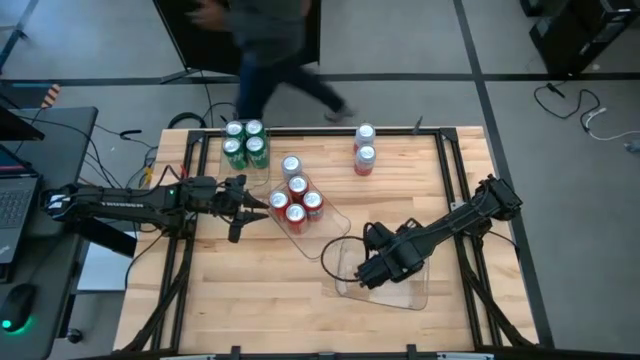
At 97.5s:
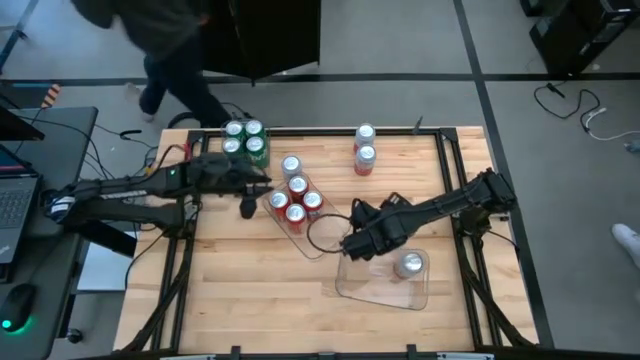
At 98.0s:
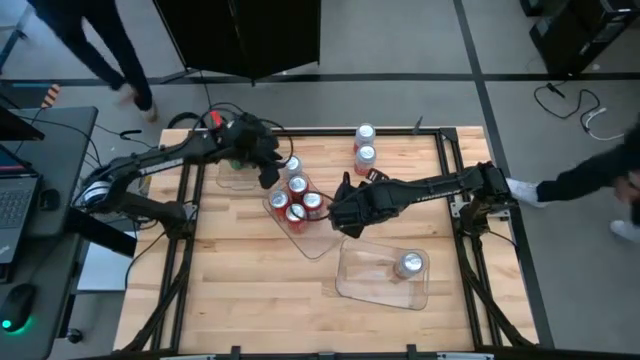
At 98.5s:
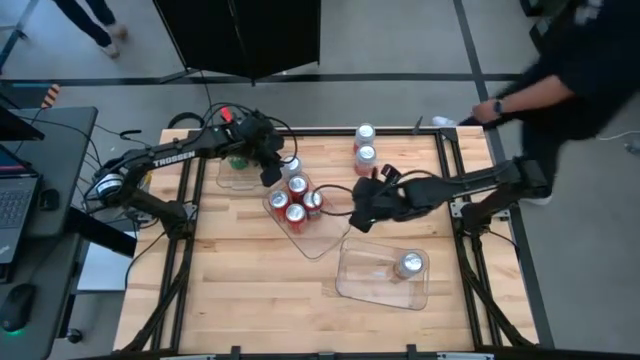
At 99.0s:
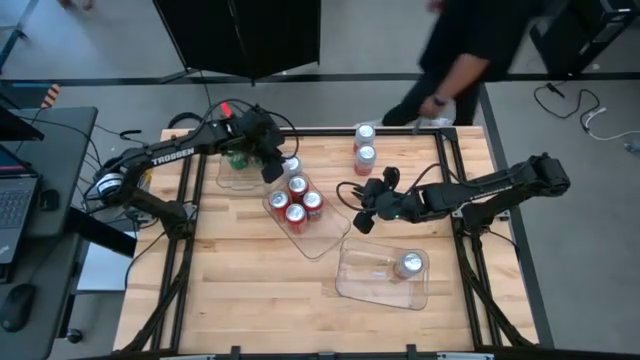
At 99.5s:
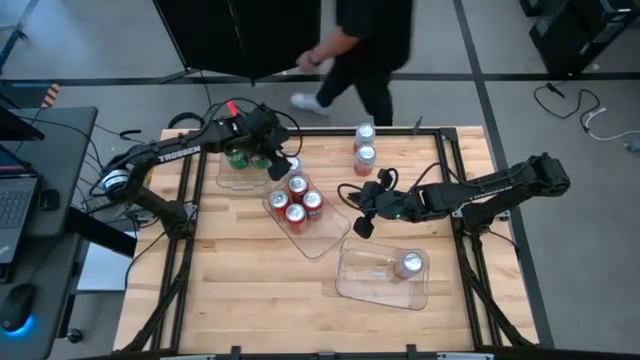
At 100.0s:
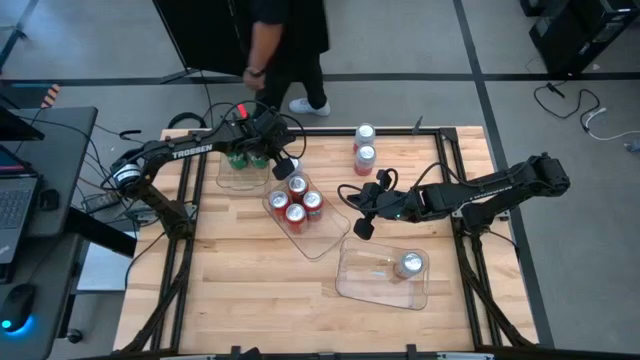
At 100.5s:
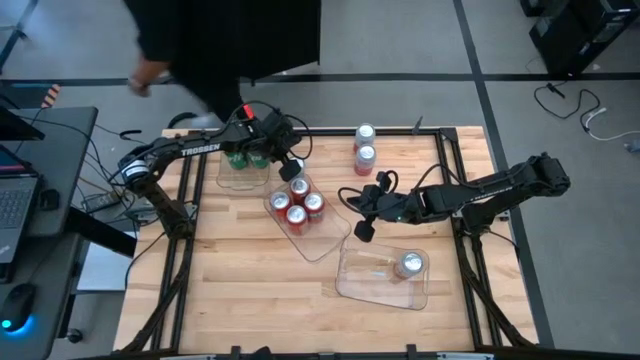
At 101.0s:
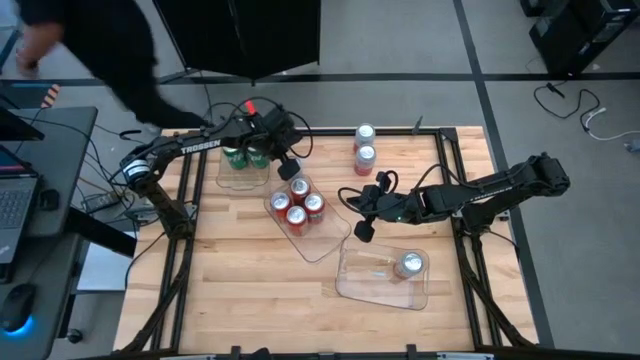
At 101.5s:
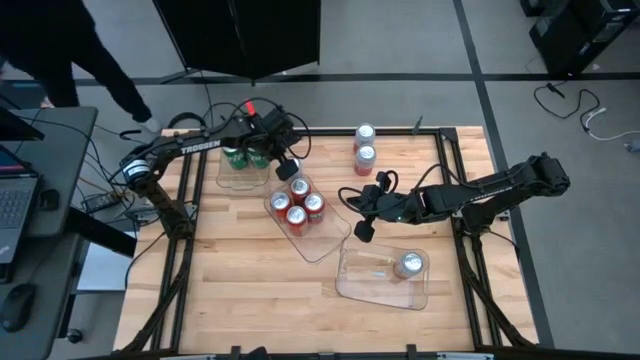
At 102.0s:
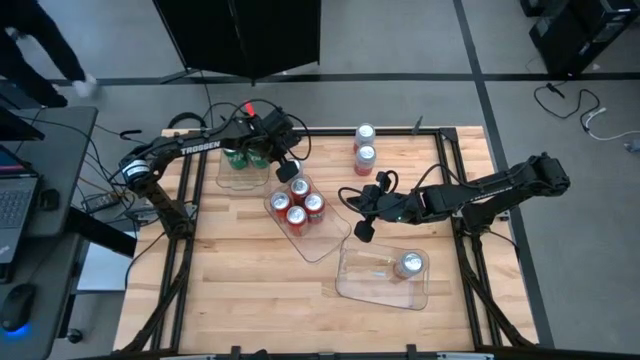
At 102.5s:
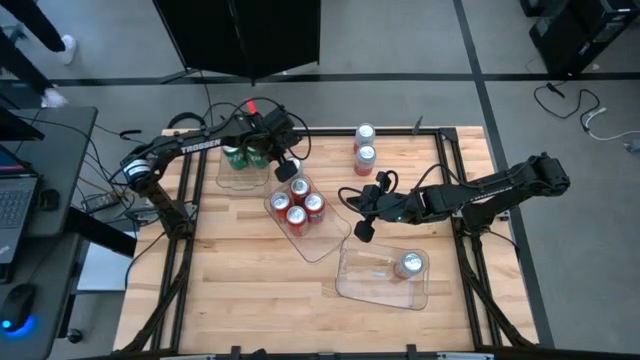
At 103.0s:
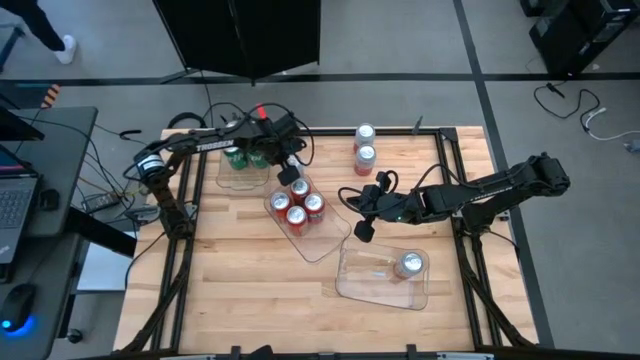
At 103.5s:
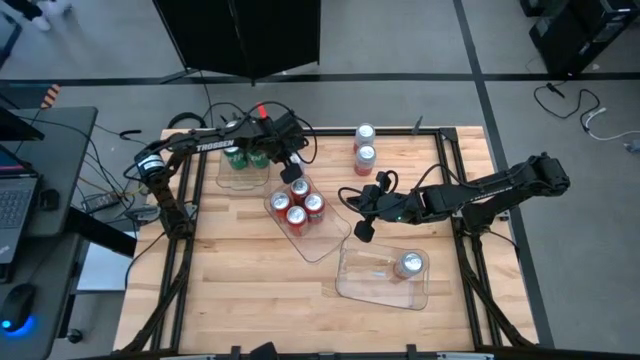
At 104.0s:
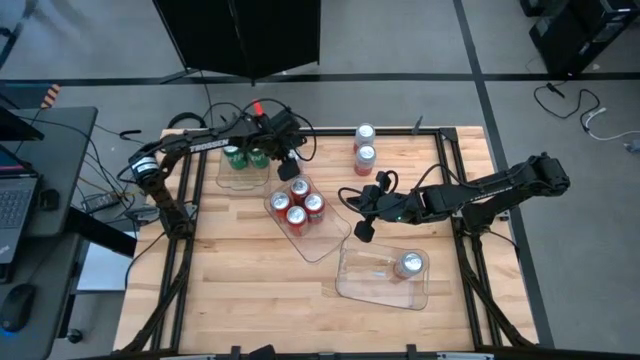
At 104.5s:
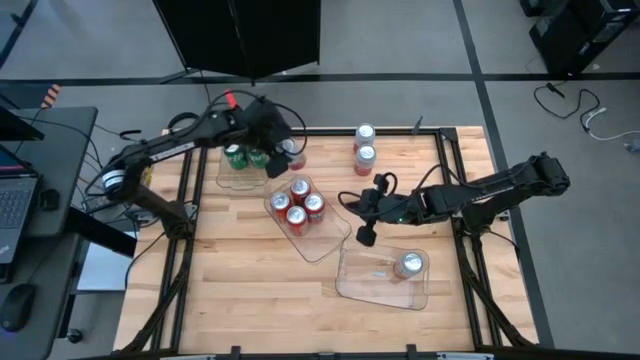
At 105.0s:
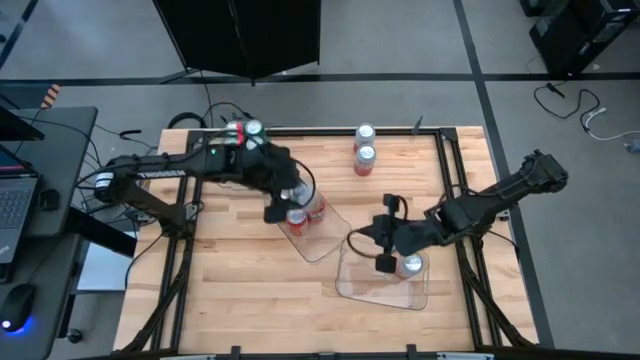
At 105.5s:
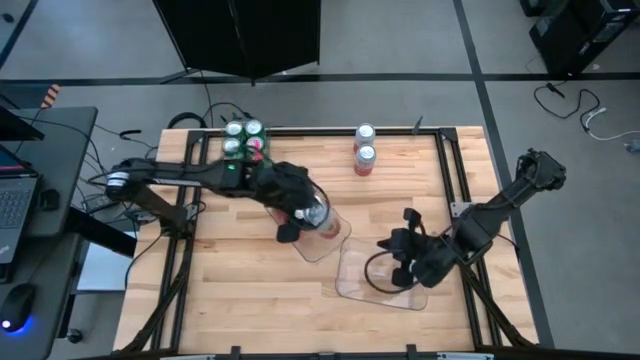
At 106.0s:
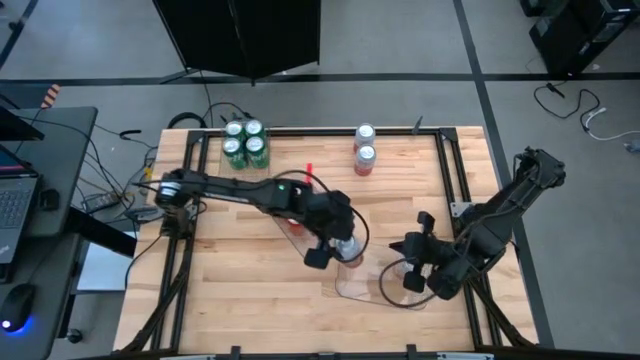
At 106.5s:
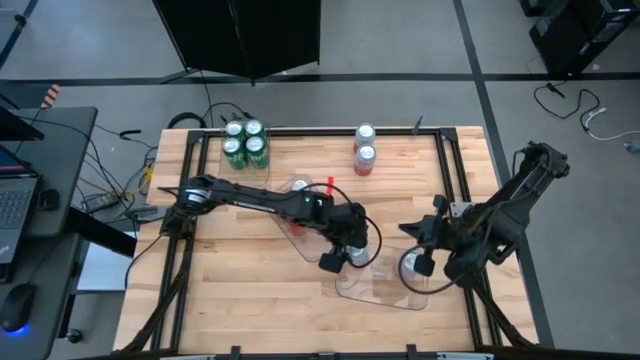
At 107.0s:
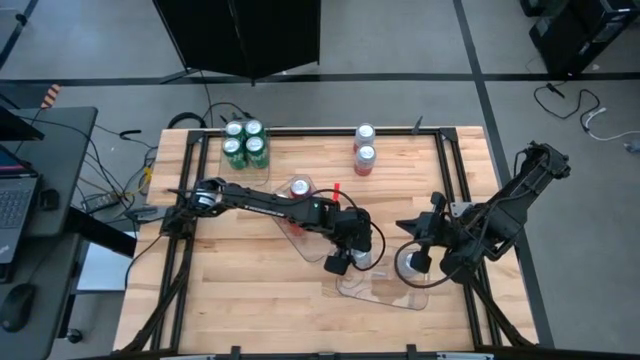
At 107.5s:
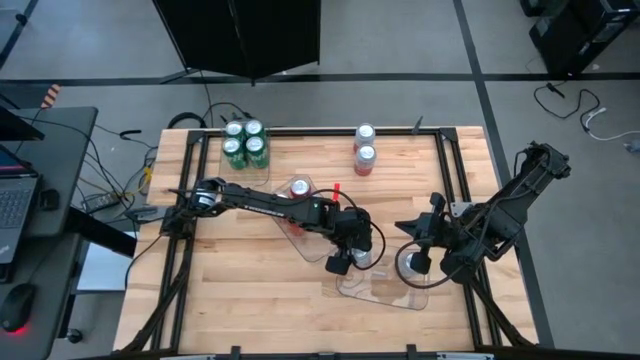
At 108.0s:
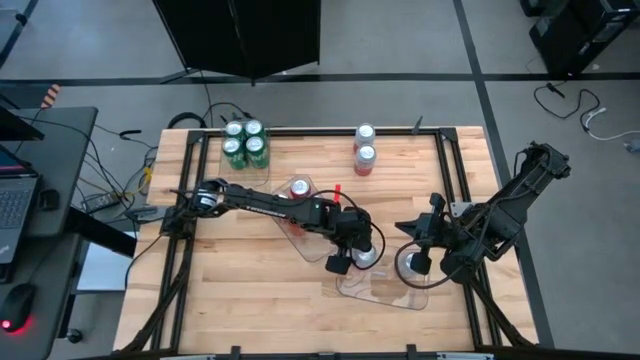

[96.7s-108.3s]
Task: Sort soda cans
Put the bottom left pink and white soda can into the bottom right transparent bin

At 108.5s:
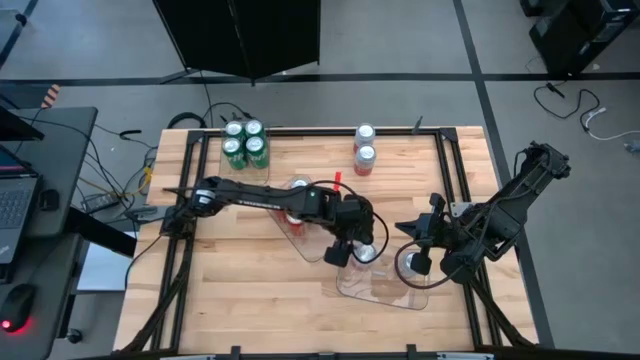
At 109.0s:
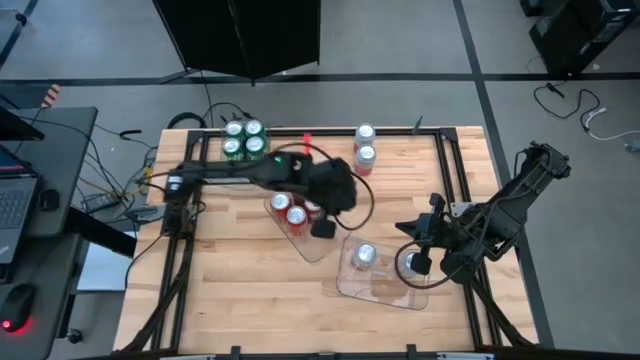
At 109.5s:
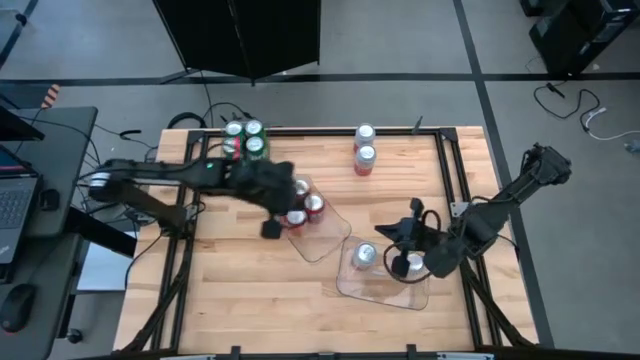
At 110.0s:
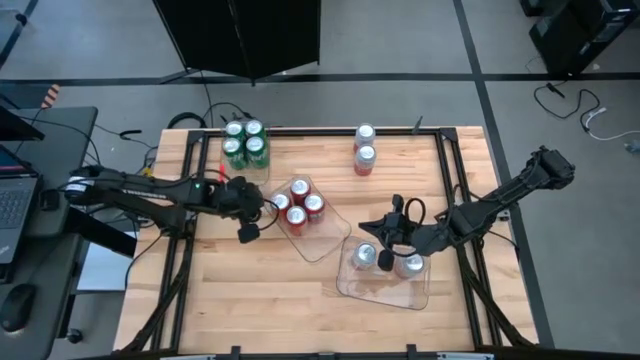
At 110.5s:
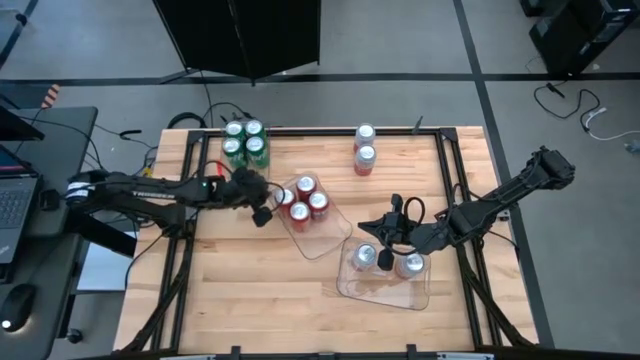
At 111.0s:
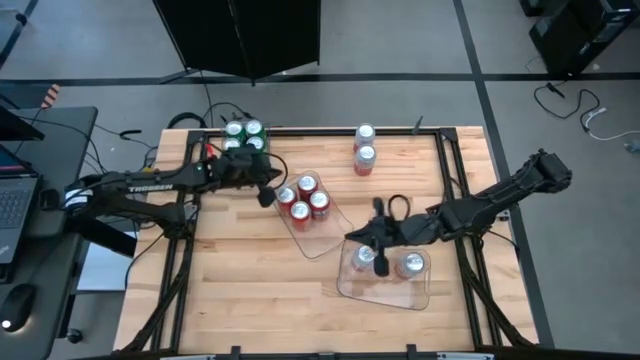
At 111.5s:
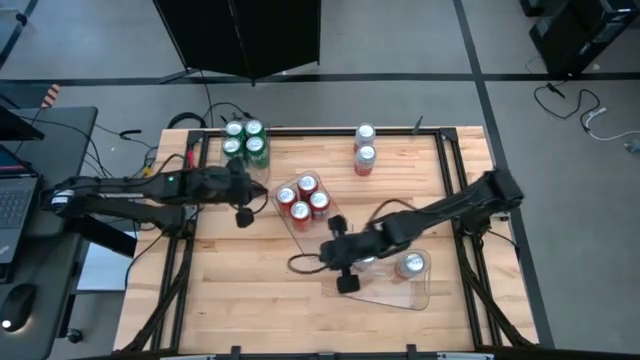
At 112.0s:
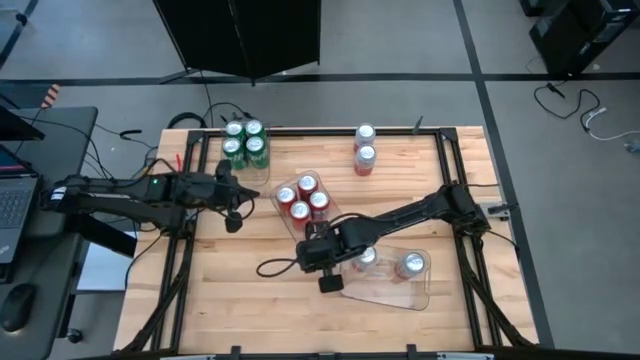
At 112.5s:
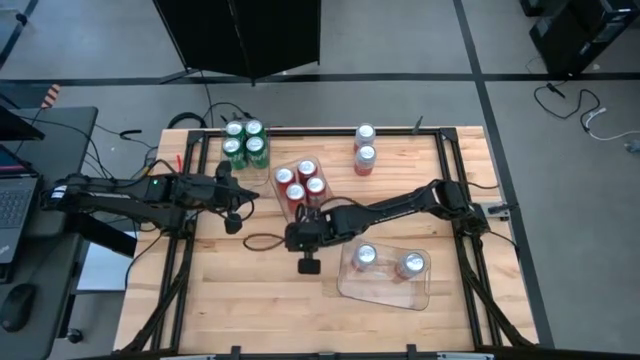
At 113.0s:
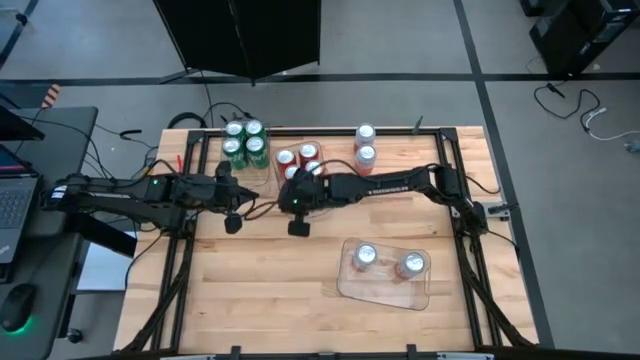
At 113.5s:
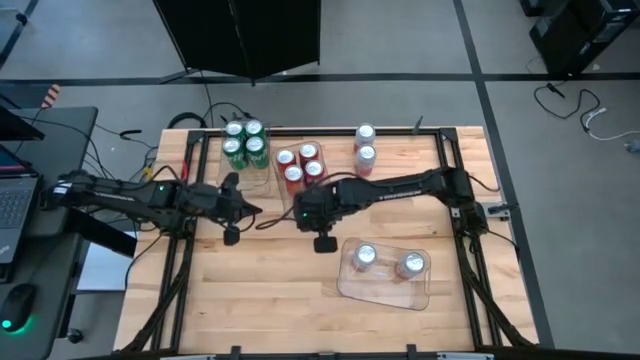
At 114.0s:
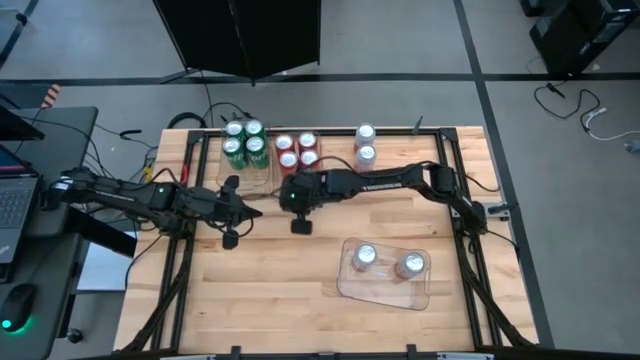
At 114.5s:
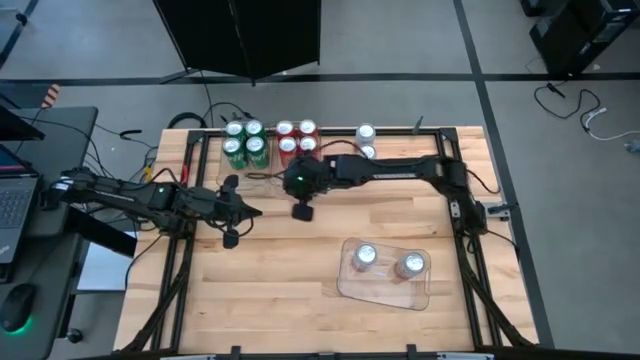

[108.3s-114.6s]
Move the center transparent bin to the top center of the table

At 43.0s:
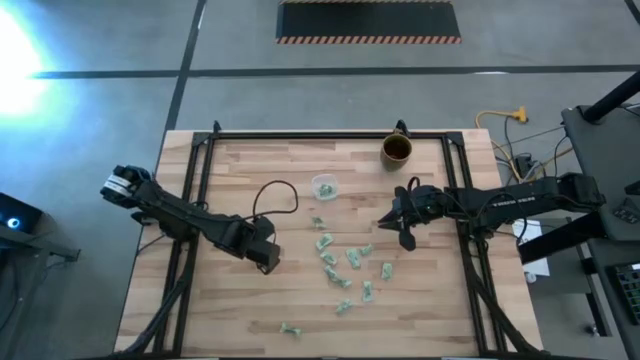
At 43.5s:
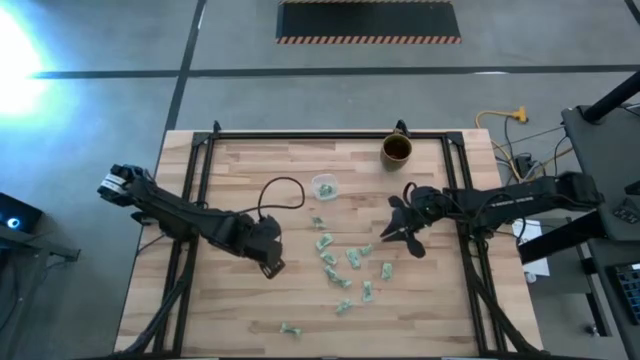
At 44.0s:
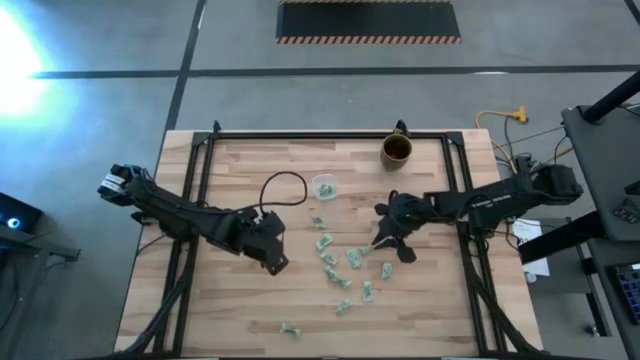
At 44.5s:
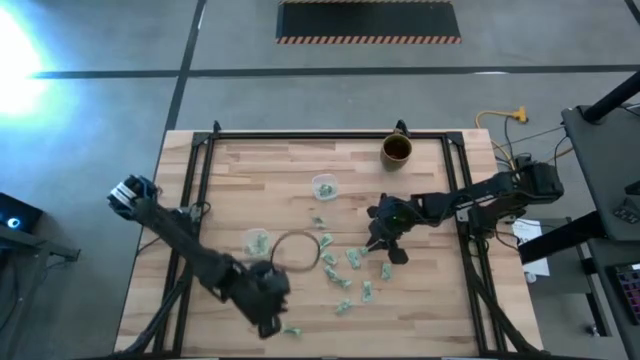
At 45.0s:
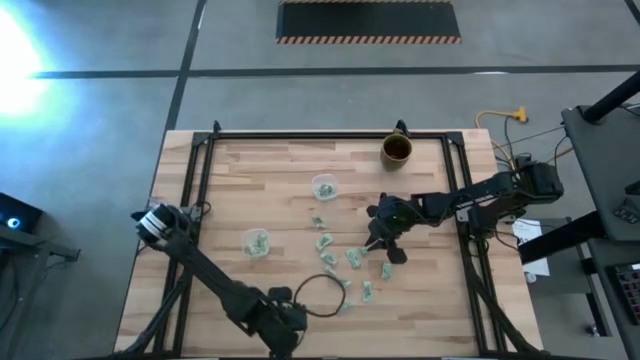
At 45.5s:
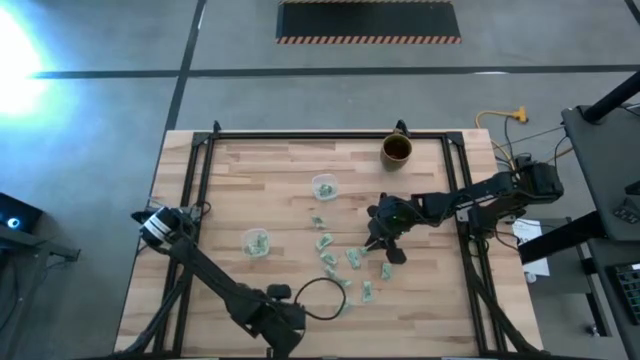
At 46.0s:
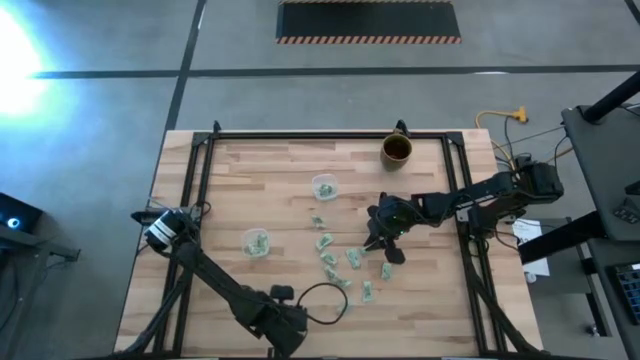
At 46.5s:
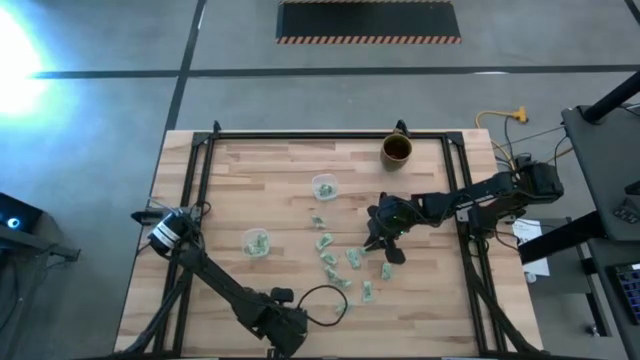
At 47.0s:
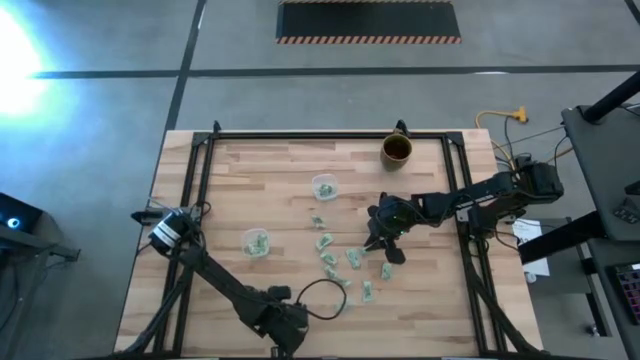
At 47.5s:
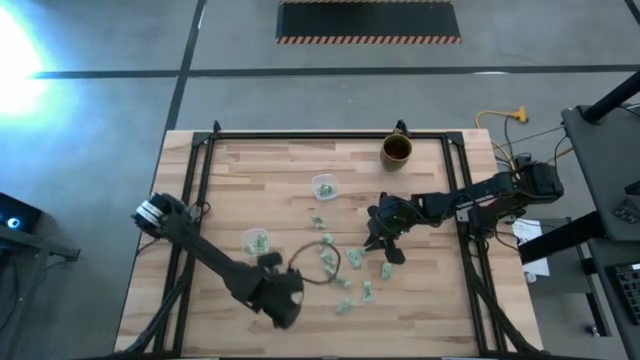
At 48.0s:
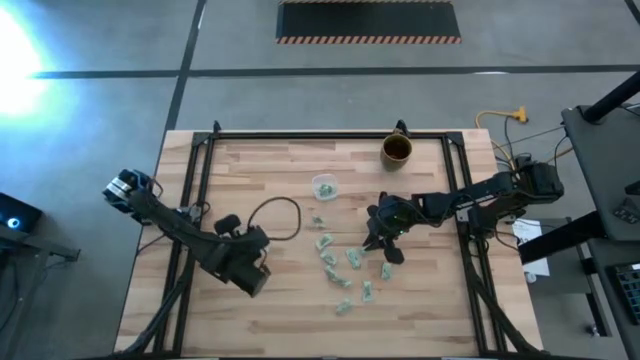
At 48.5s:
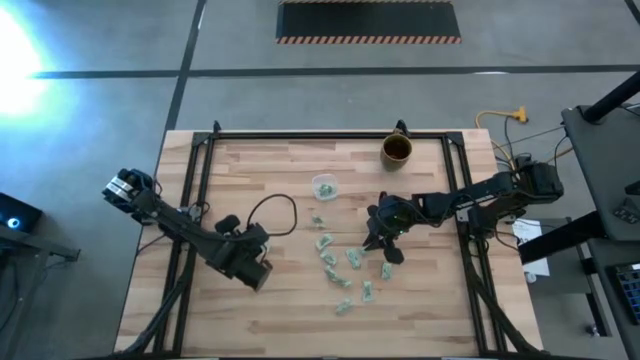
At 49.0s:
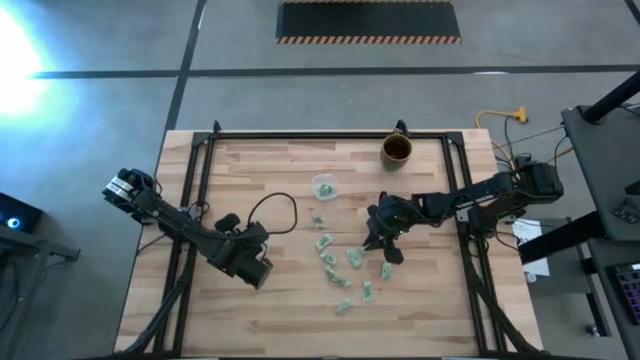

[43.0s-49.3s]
Task: Pick and place Stevia / Truvia into bins
Put the stevia packet into the bottom transparent container
